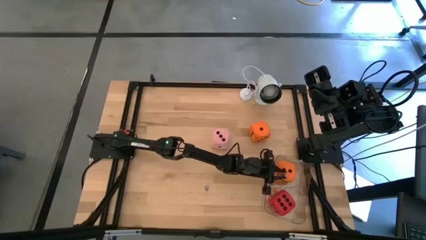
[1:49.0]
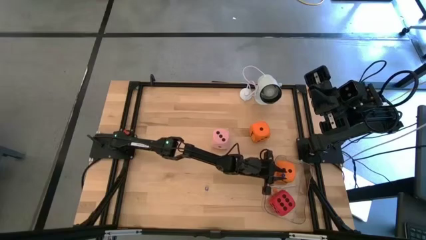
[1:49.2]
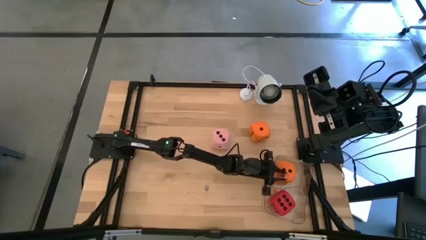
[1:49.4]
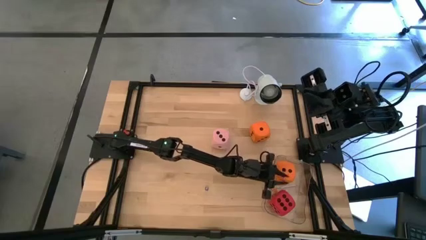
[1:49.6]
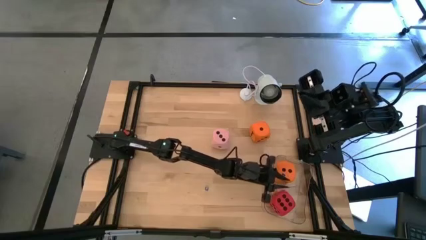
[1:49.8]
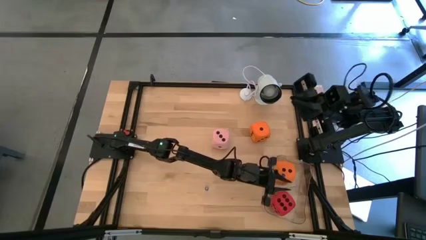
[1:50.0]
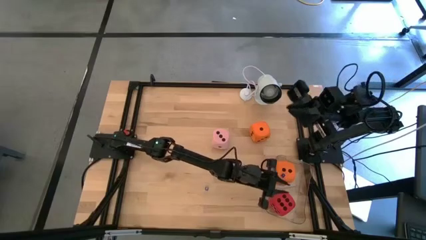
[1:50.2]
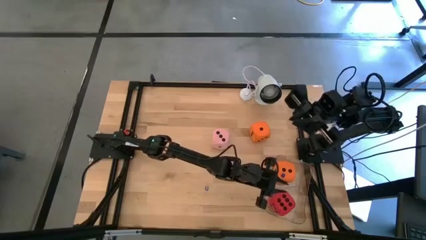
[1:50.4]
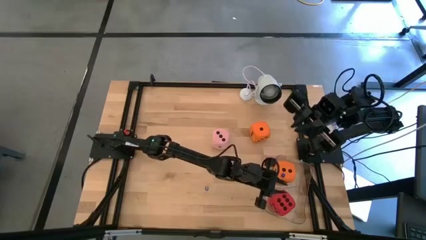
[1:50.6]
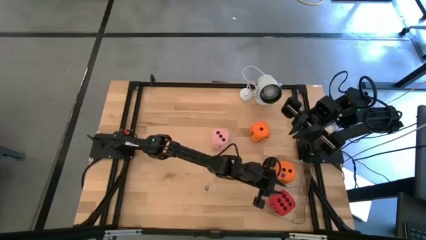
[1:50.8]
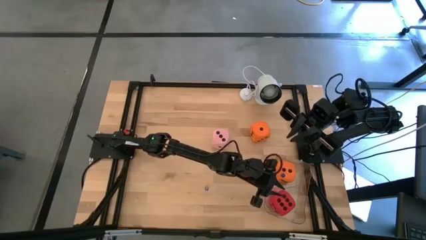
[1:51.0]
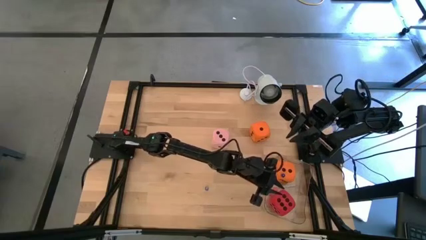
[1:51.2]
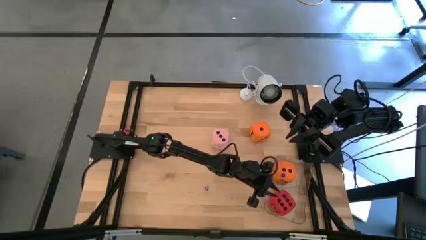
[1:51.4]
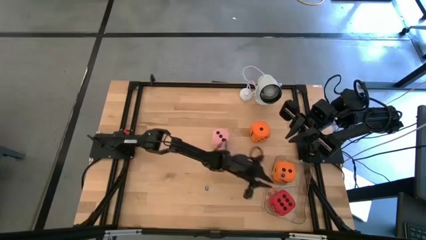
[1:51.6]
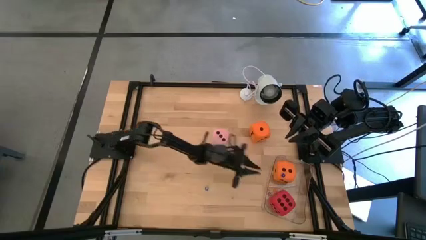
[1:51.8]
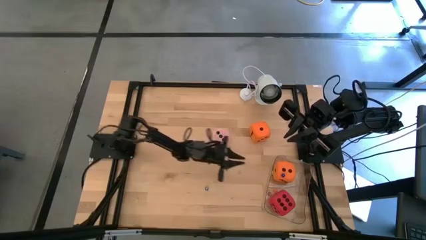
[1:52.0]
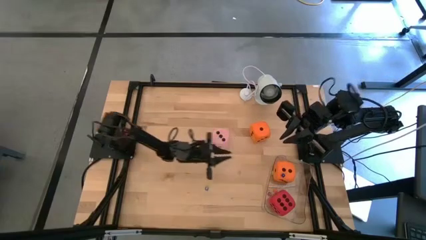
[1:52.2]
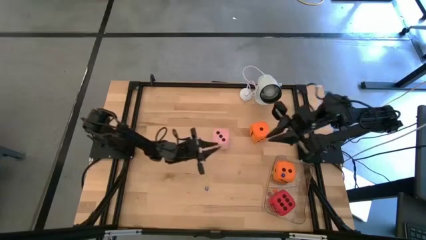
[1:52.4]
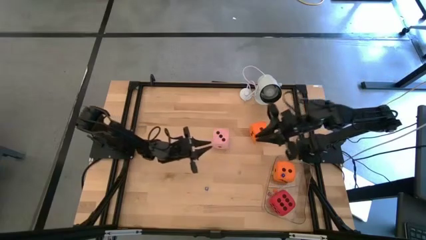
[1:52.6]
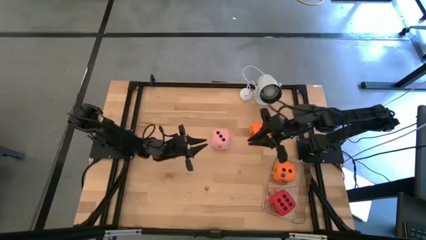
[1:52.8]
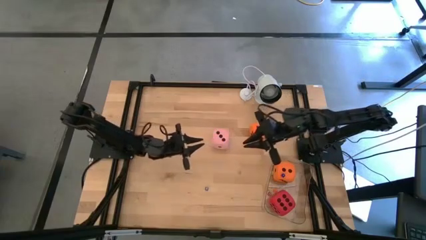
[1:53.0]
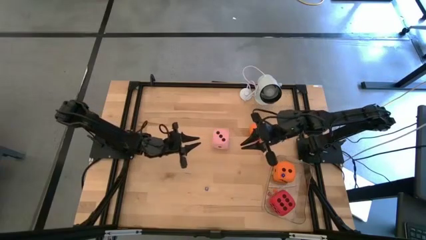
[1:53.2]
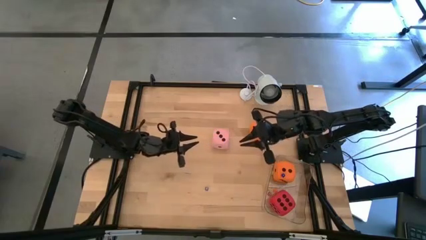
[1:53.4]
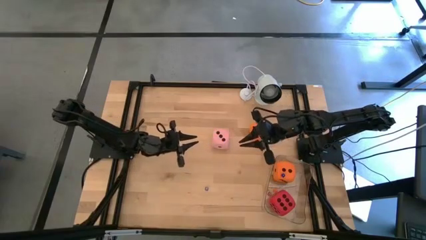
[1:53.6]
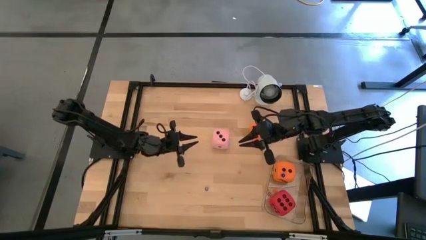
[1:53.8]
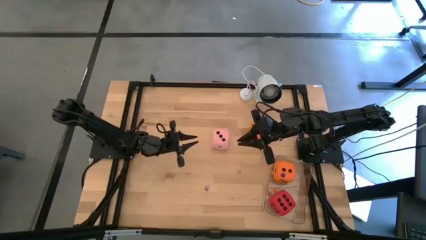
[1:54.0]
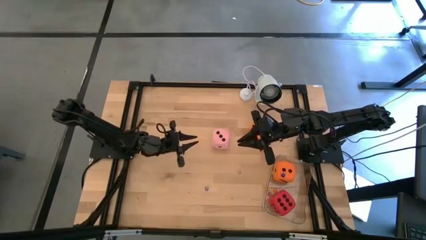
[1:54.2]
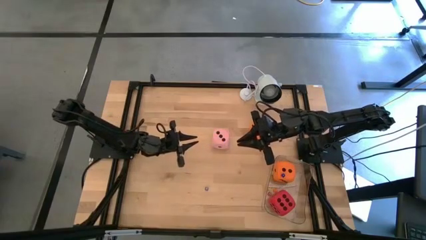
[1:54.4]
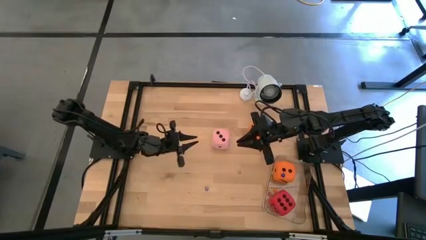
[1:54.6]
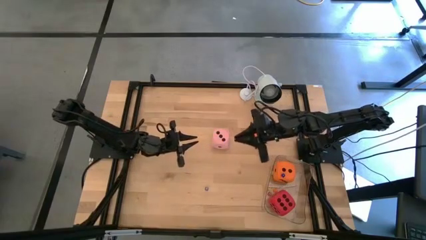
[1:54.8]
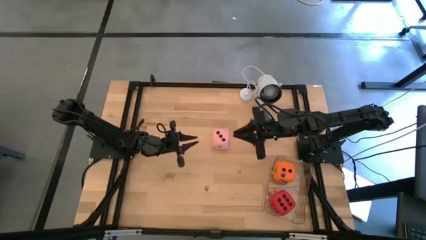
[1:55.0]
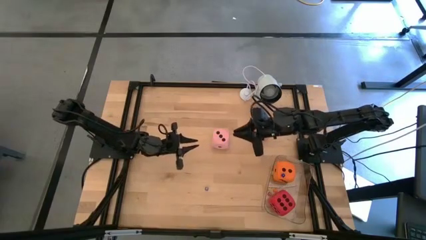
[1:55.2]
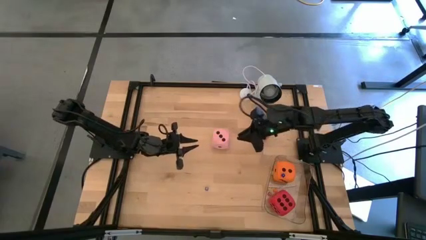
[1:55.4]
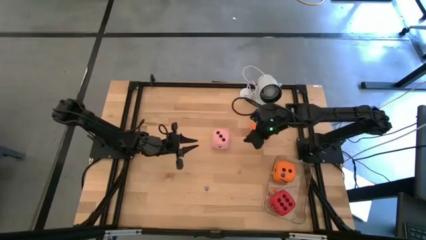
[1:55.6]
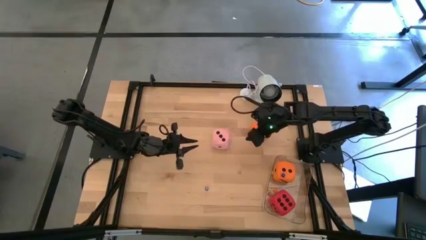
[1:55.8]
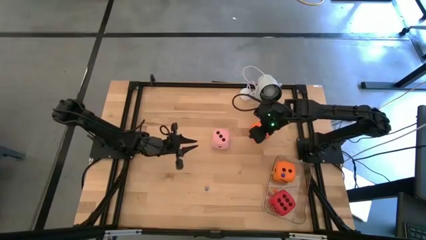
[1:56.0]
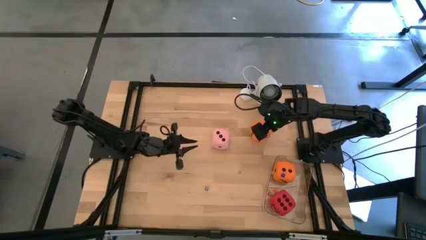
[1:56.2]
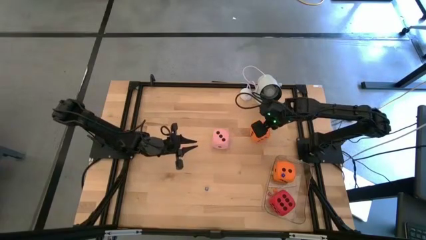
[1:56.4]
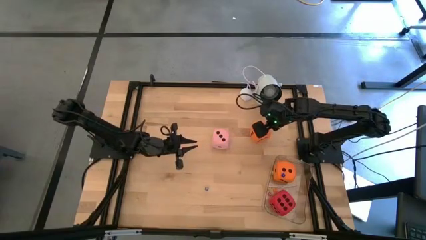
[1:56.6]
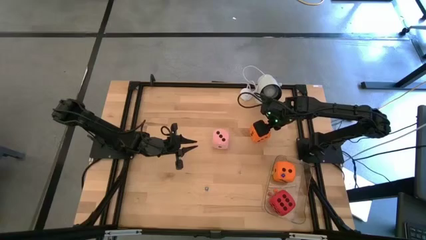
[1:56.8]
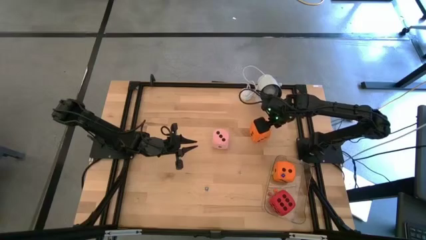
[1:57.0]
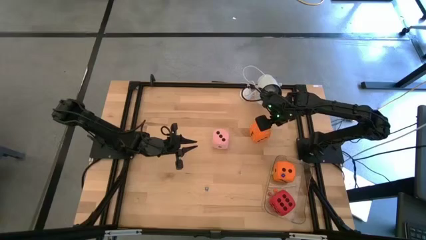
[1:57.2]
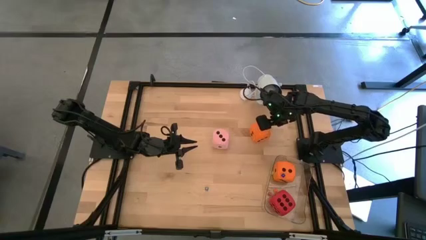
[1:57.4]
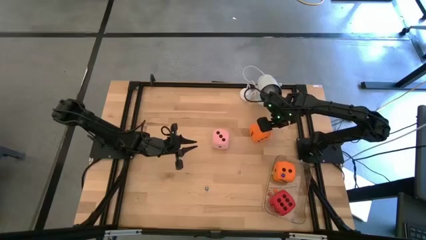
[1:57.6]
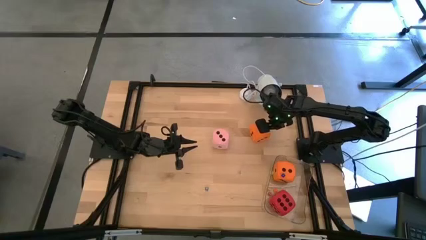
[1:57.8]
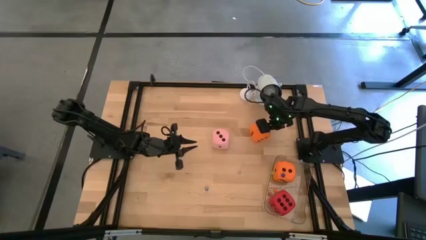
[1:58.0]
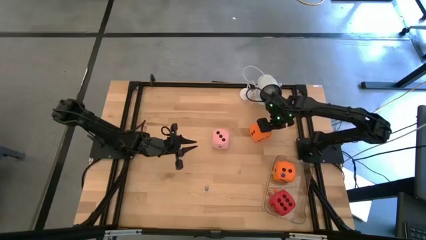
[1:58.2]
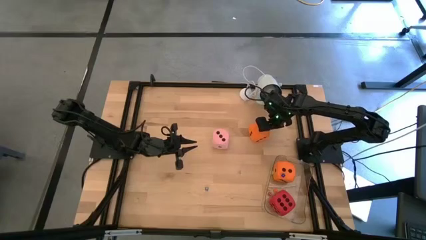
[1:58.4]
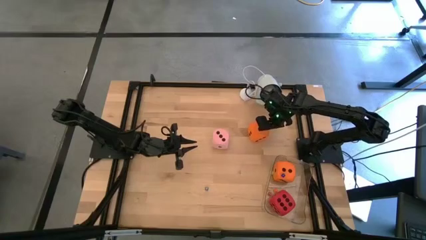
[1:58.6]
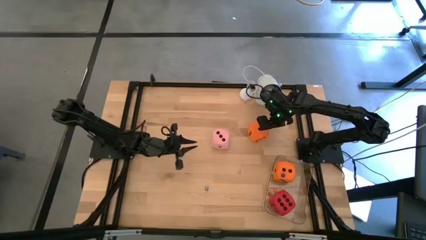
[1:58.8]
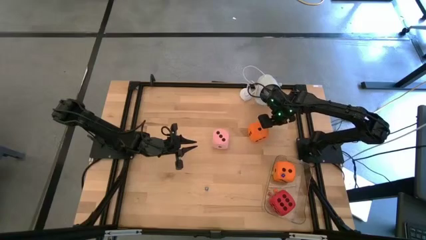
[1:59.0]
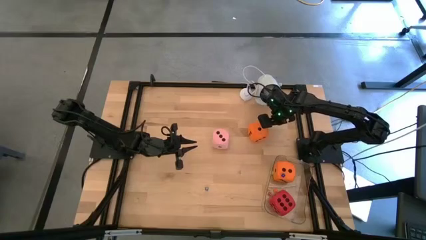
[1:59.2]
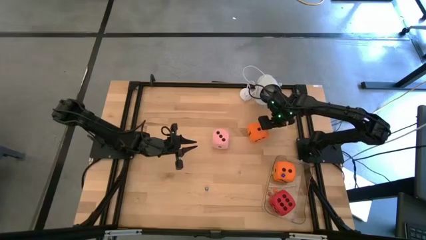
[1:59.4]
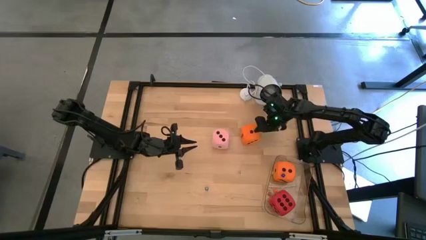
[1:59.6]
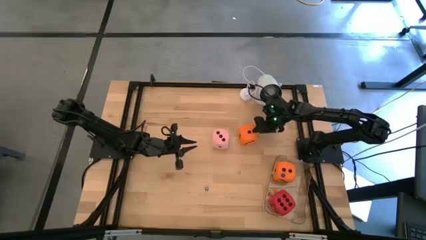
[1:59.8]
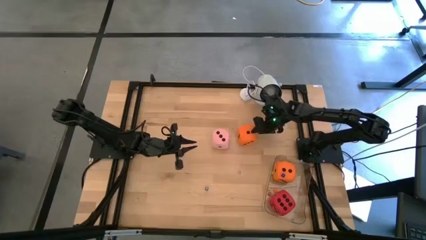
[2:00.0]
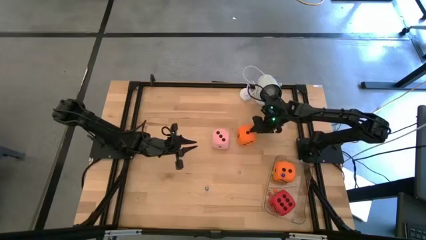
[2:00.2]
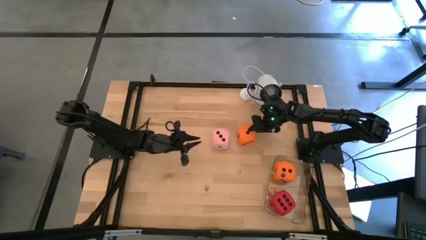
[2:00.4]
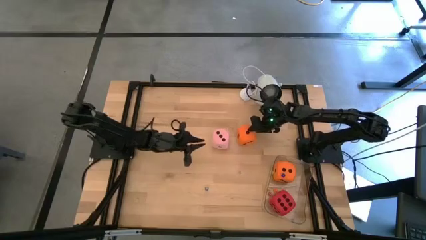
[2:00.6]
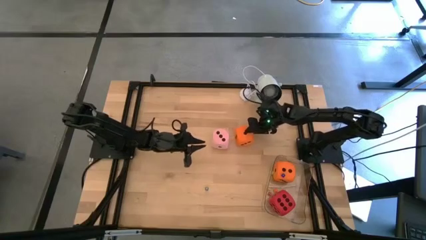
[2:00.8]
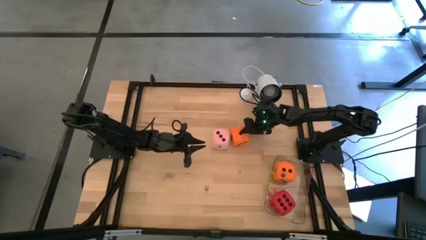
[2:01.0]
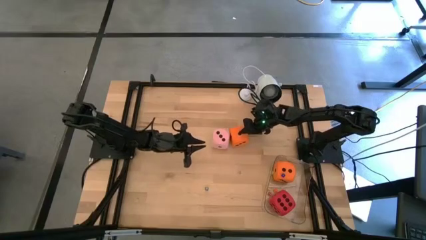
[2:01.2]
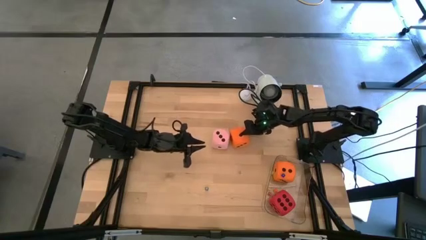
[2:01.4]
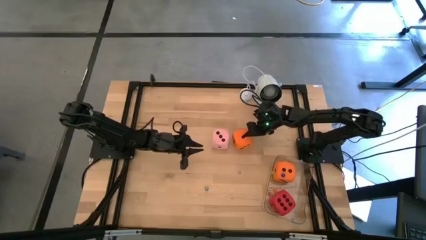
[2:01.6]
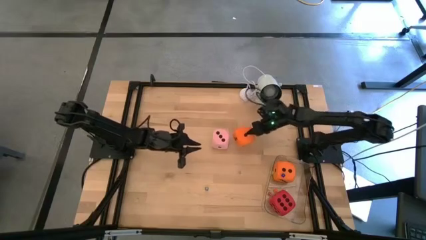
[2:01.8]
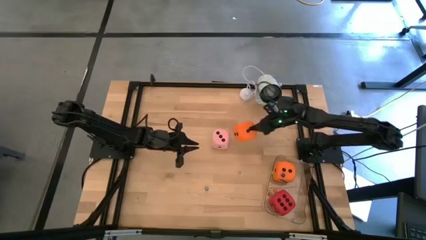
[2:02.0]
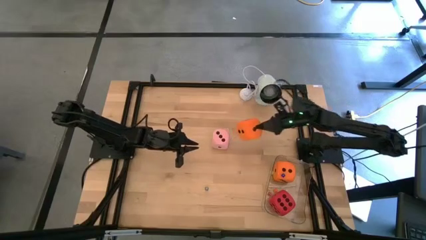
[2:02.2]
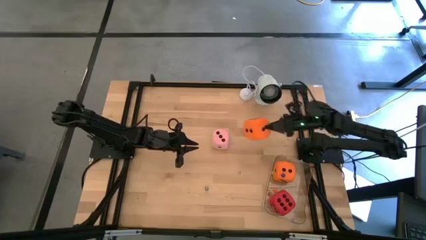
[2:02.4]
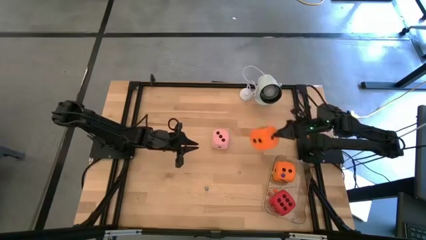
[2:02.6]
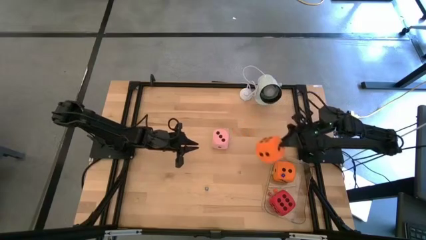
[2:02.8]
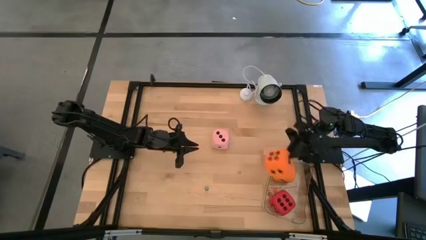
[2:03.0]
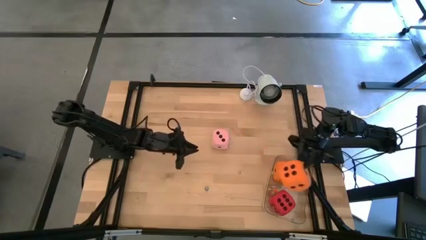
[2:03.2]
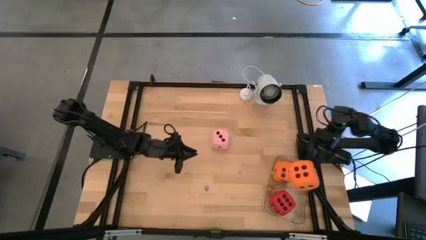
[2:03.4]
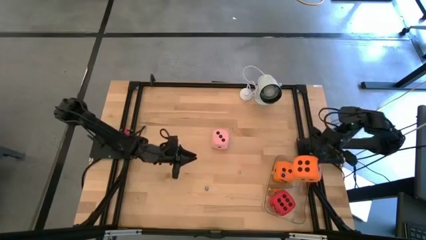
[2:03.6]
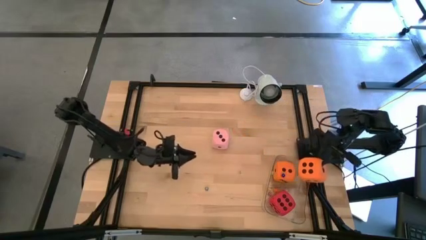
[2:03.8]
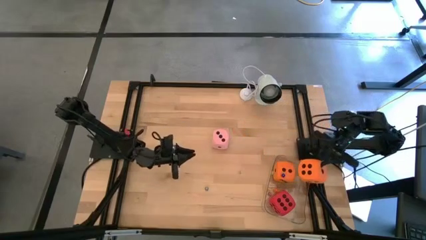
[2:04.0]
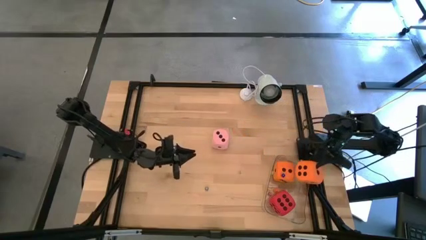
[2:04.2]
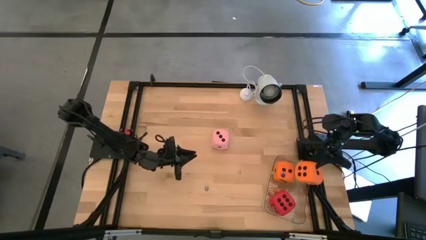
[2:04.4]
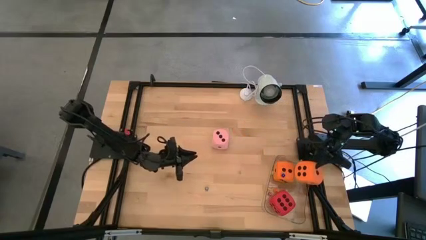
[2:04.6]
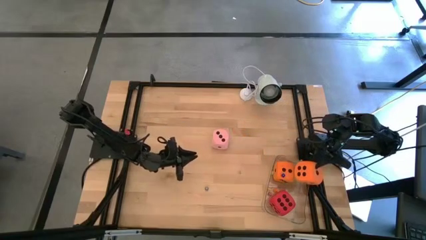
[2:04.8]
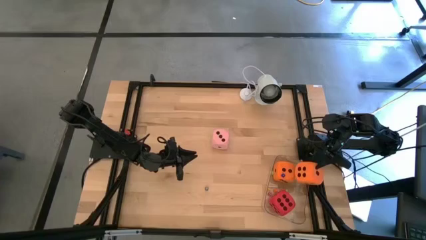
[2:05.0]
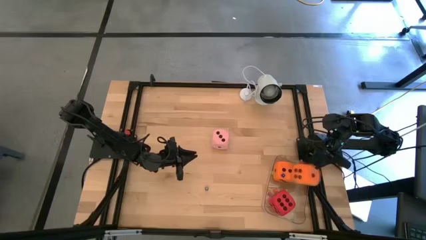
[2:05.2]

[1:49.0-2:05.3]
Task: Pick & Place Dice
Put the large orange die into the transparent container
